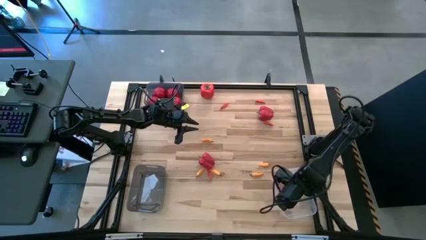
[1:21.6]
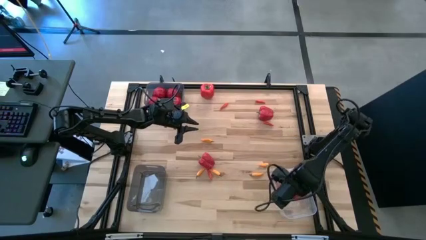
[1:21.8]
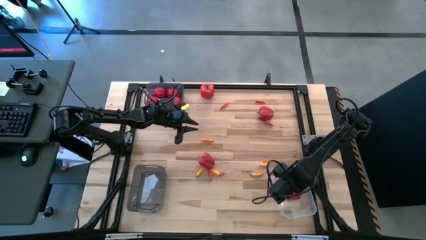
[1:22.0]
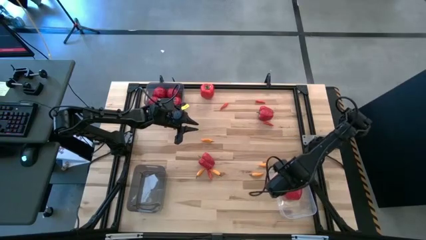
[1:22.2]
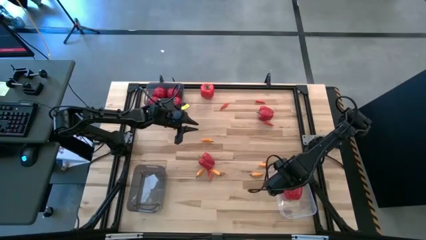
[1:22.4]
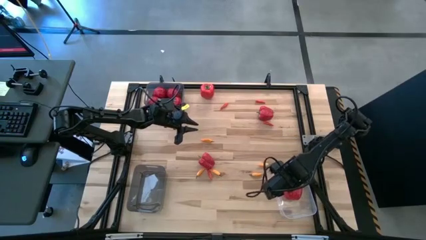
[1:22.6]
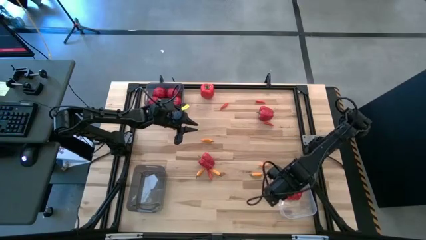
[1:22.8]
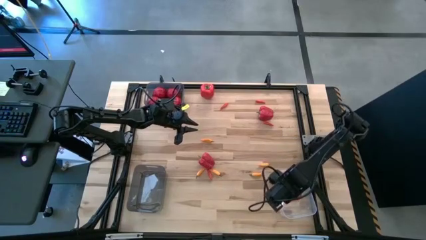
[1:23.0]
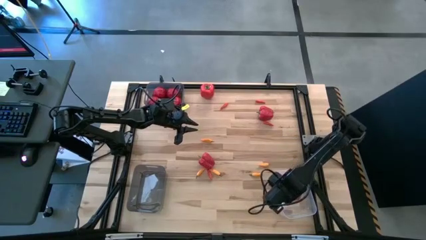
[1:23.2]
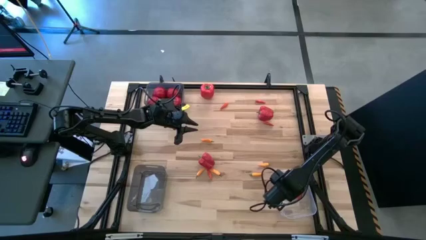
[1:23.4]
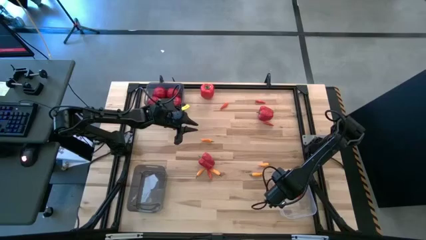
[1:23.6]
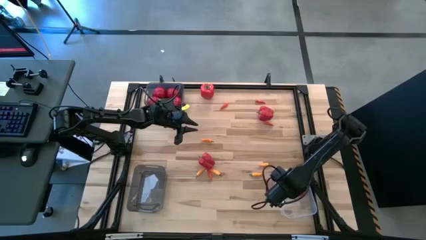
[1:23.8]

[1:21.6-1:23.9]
Task: Sort produce into baskets
Adjust the red bell pepper in the transparent bin

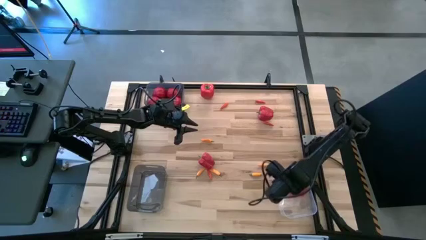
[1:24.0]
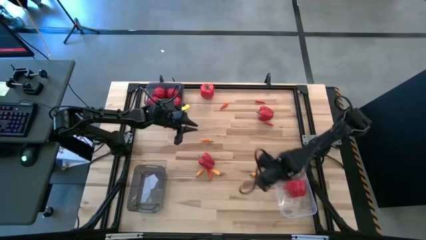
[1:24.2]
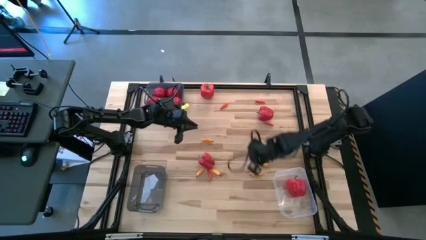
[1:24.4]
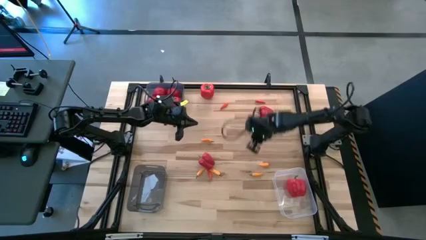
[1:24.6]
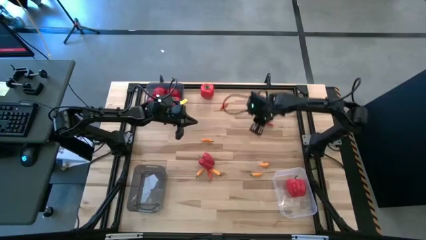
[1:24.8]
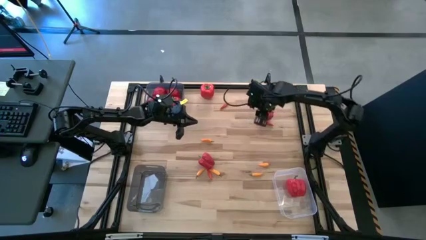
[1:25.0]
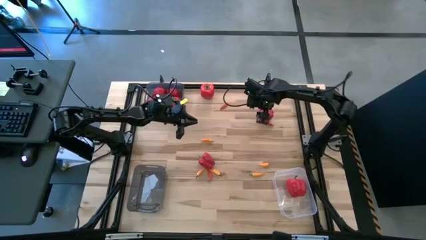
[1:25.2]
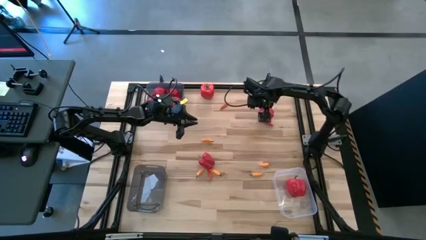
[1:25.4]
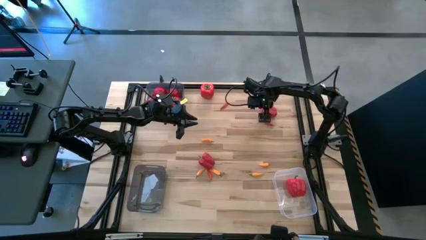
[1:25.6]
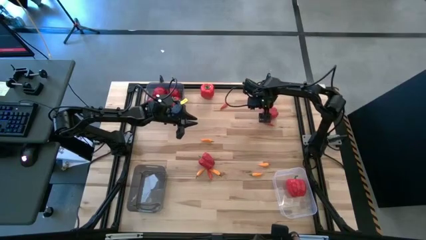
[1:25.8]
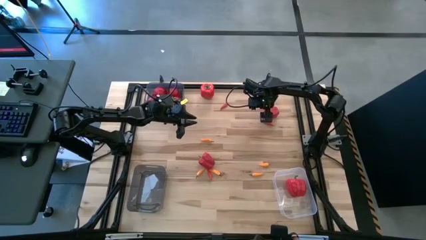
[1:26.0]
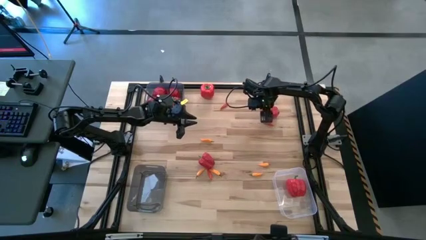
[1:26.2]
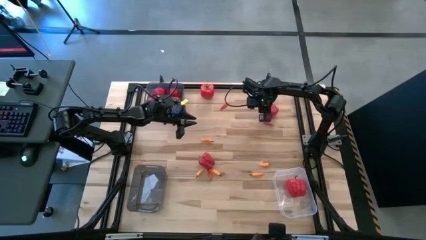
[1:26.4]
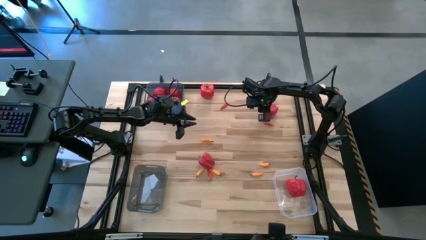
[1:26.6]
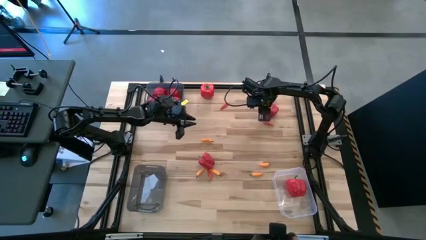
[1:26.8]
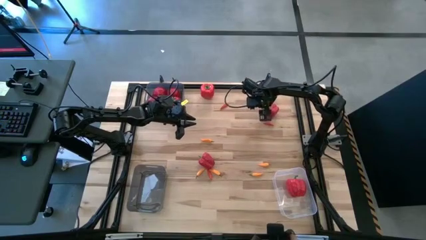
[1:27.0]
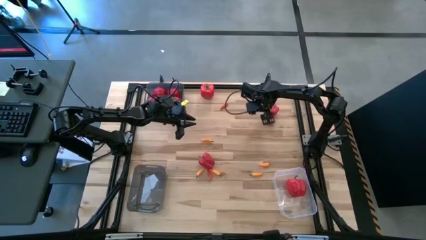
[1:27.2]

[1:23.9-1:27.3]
Put the red bell pepper into the transparent bin

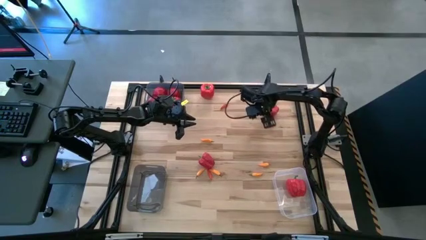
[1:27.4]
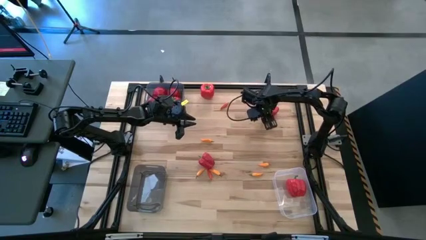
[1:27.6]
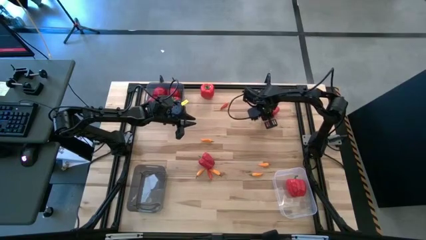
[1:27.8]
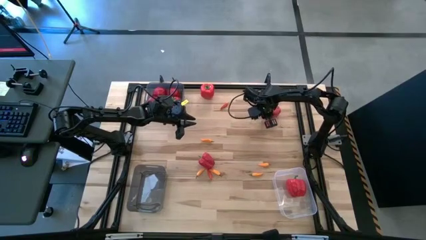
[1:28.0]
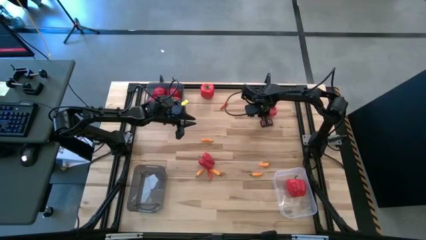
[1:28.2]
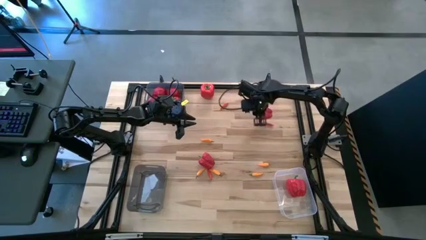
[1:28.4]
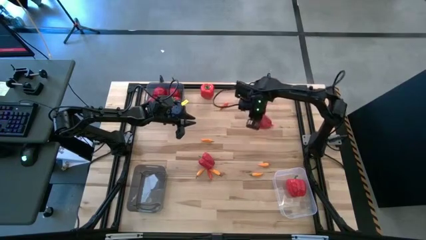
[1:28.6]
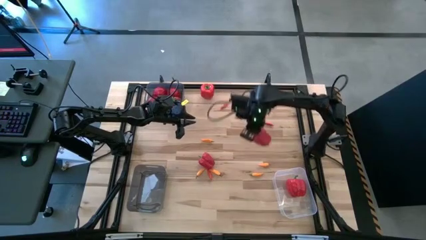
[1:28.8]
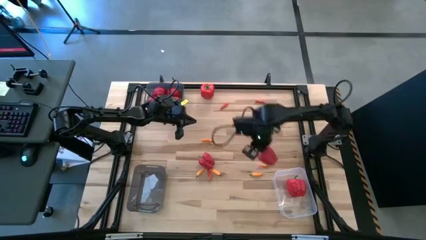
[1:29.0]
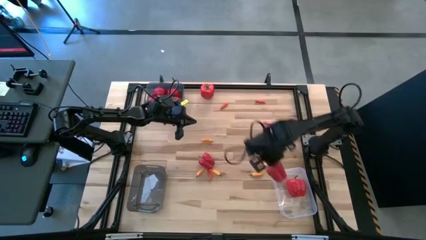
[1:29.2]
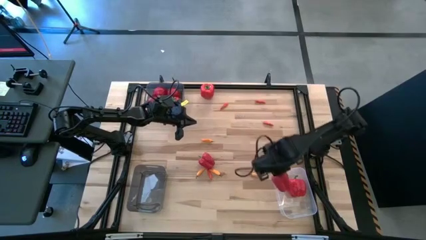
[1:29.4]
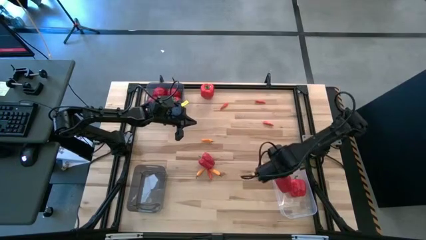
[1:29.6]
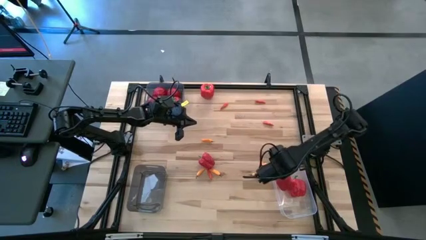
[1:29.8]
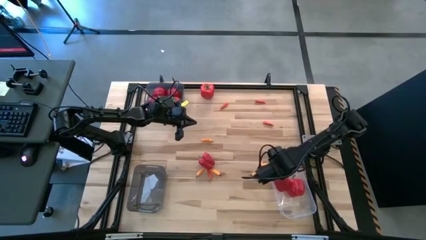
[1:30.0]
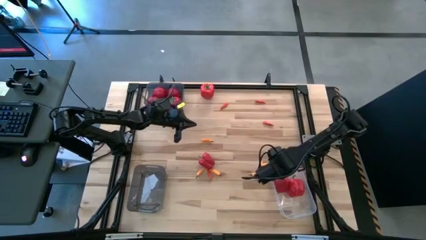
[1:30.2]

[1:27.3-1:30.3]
Put the red bell pepper into the transparent bin

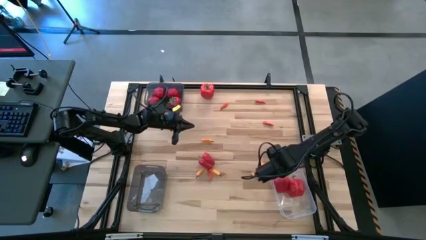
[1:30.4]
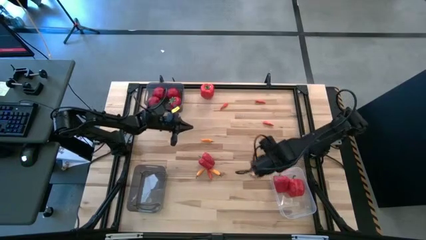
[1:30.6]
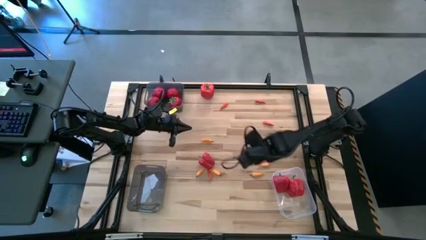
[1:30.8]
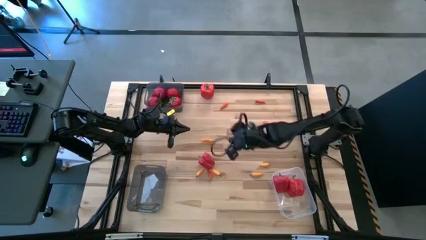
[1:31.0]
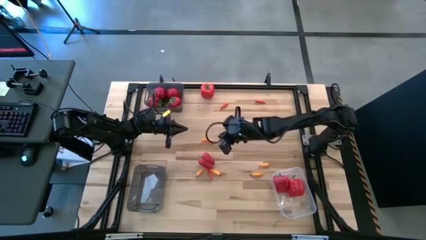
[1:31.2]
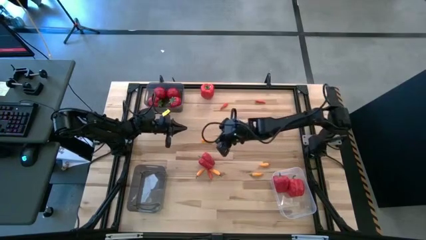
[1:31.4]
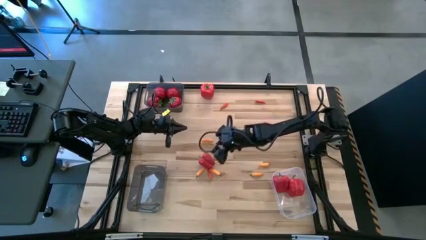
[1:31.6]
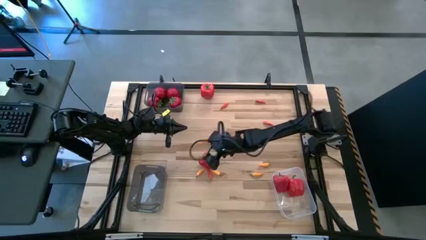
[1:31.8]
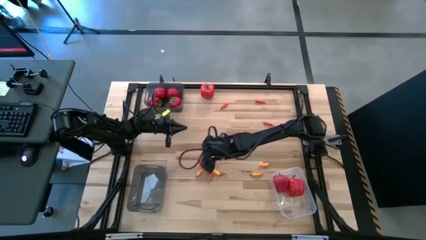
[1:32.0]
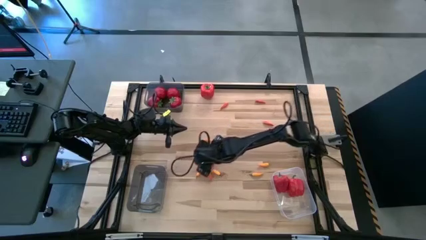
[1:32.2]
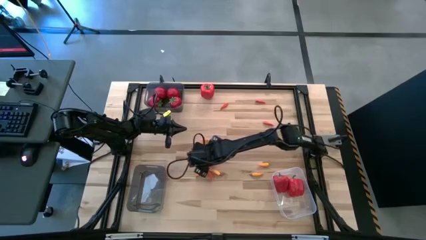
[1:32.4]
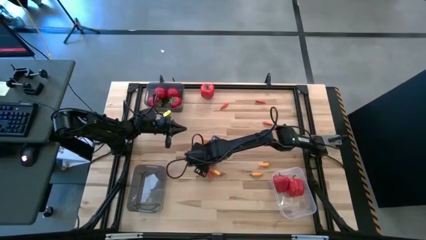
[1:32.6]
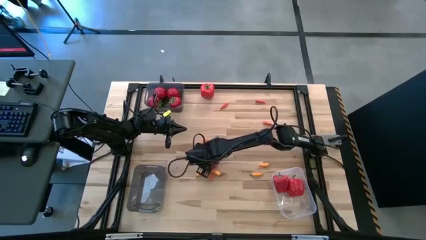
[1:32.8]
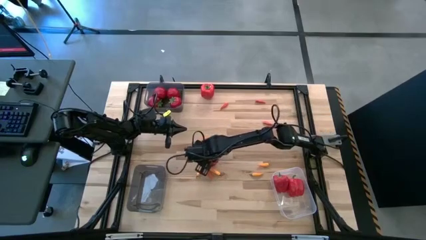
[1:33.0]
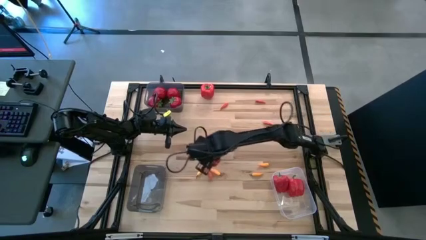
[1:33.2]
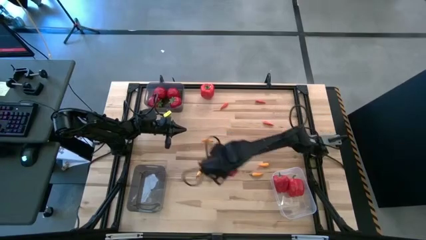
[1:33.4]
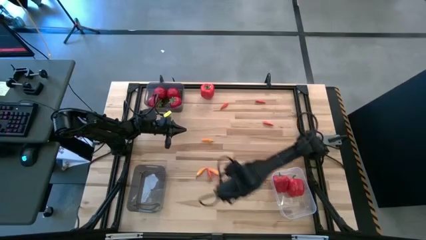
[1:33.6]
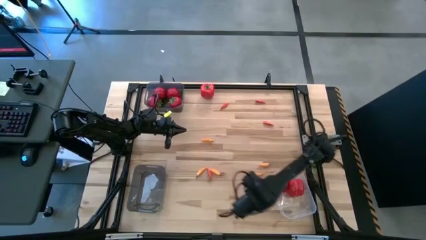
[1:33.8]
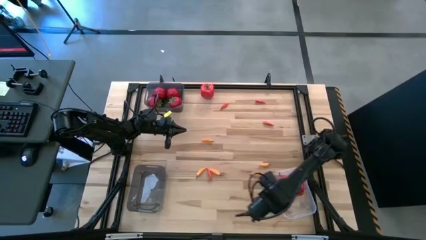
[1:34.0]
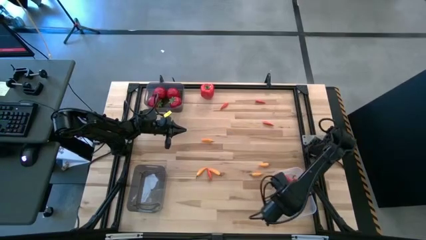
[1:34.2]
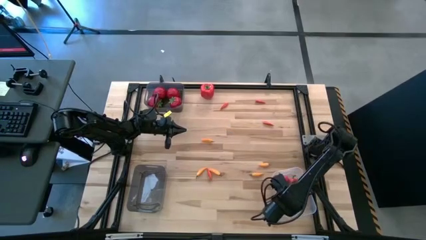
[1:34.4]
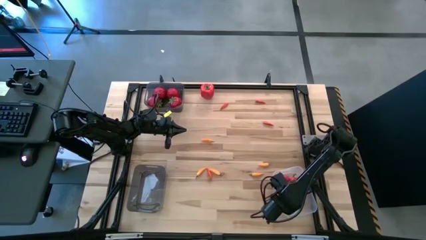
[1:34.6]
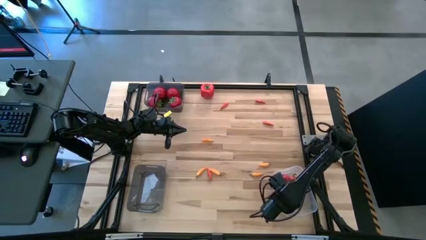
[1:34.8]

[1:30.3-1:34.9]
Put the red bell pepper into the transparent bin

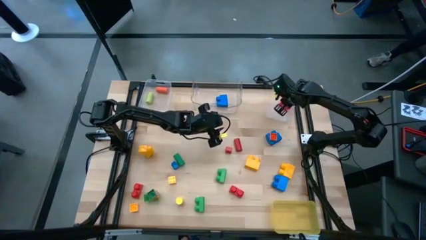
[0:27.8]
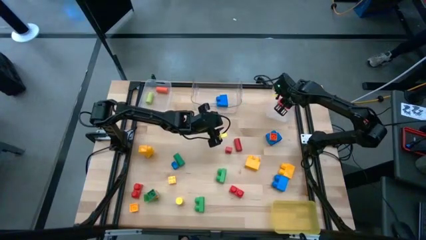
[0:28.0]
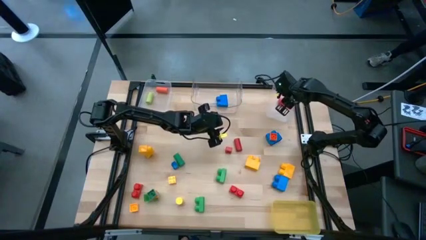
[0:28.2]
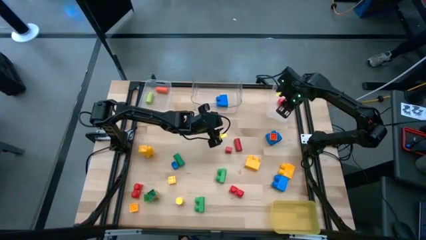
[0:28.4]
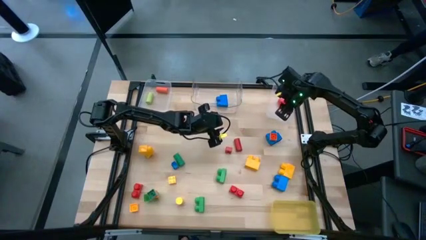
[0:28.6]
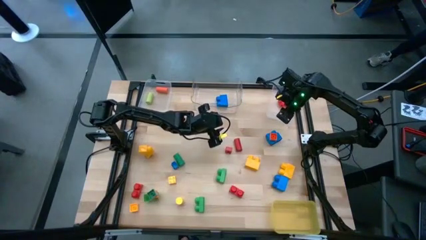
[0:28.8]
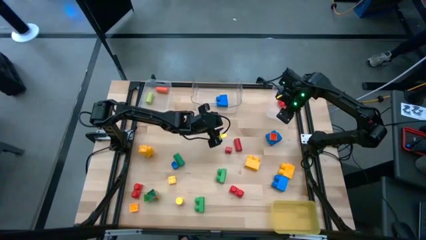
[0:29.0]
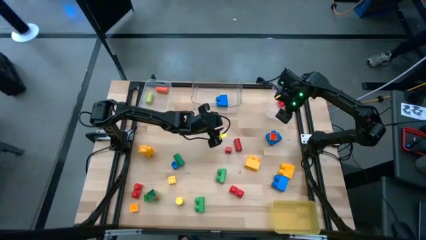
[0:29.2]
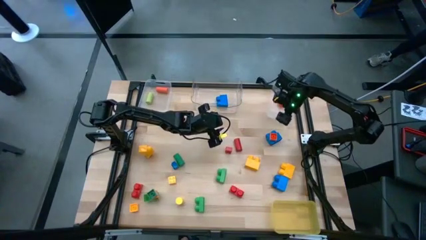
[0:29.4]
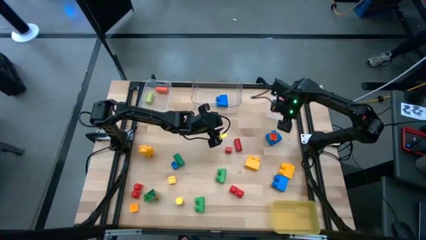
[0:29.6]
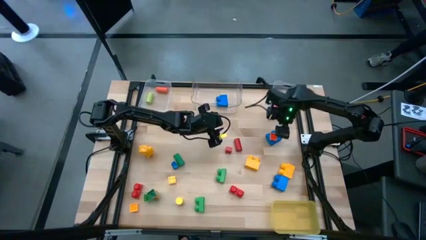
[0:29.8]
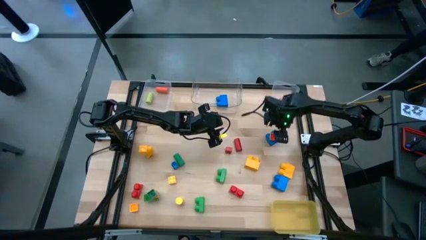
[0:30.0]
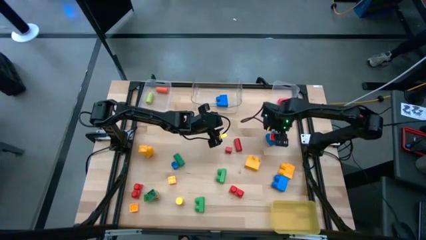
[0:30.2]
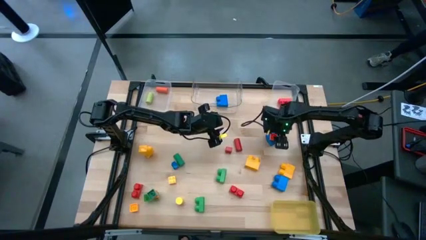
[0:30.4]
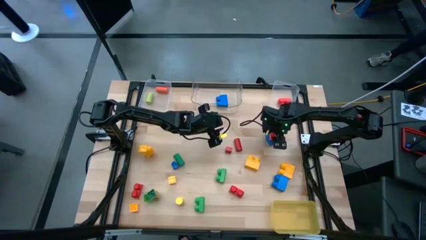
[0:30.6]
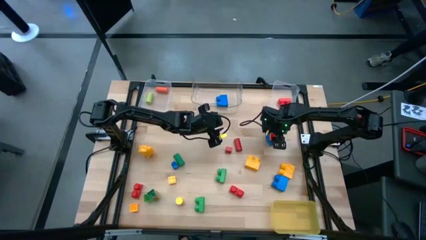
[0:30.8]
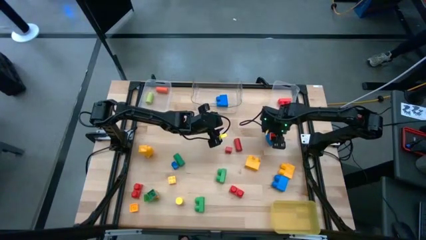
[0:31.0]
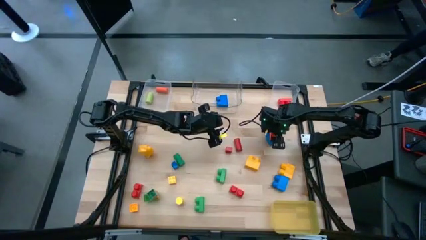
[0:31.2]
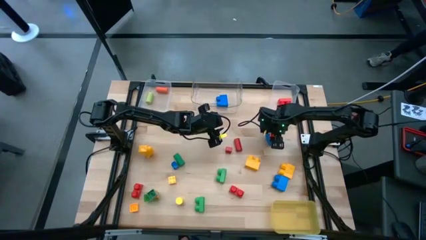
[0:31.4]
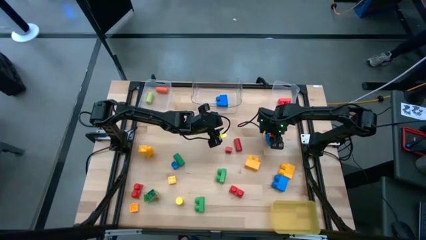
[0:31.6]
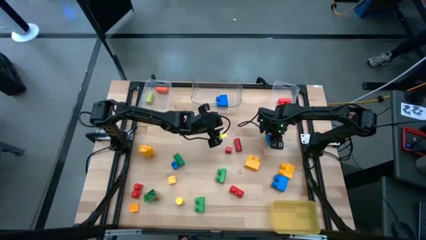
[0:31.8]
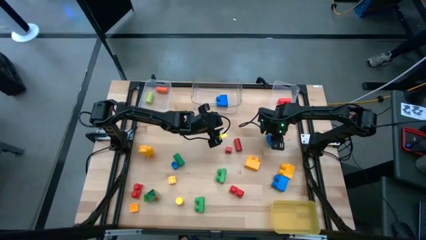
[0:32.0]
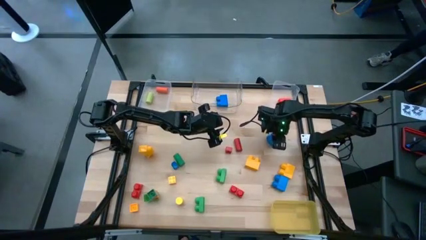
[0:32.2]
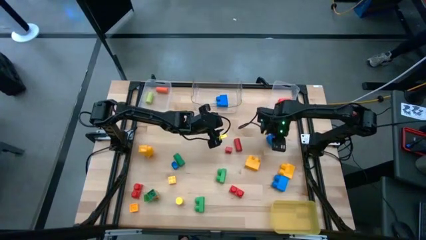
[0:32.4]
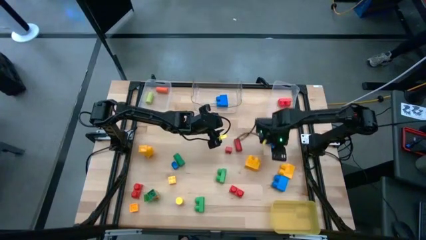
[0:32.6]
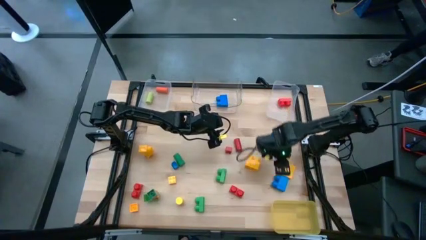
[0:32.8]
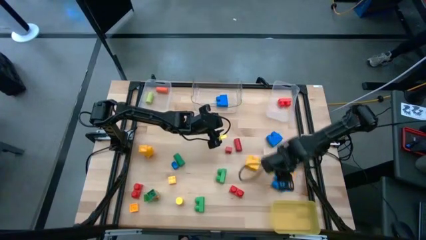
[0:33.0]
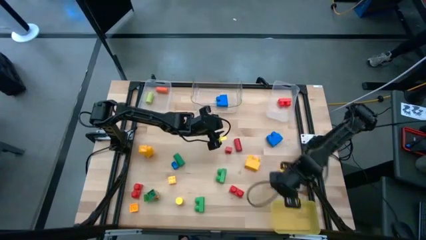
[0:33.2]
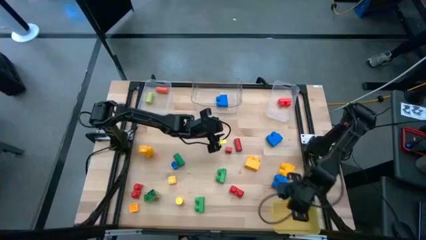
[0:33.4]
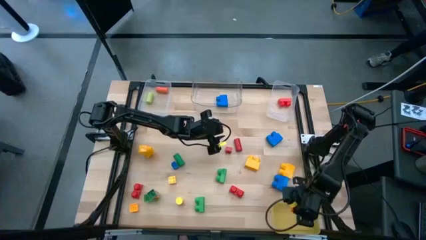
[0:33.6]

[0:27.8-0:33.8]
Task: Sort blocks by size
Put the small orange game piece into the yellow bin
